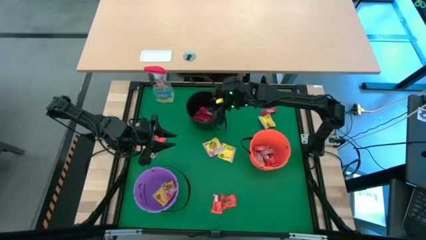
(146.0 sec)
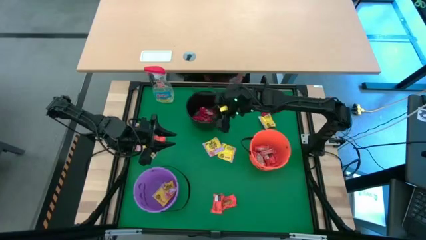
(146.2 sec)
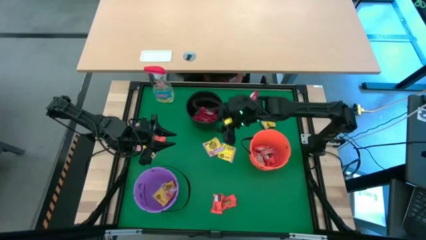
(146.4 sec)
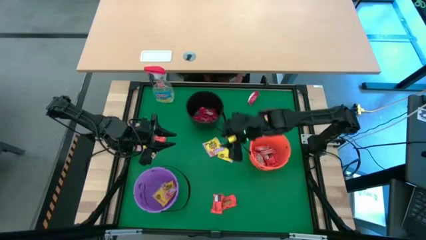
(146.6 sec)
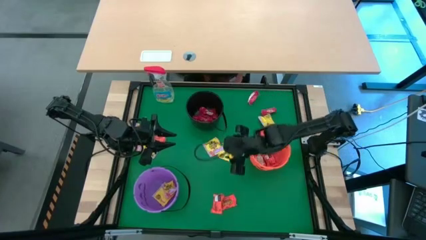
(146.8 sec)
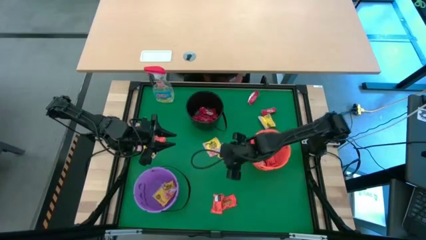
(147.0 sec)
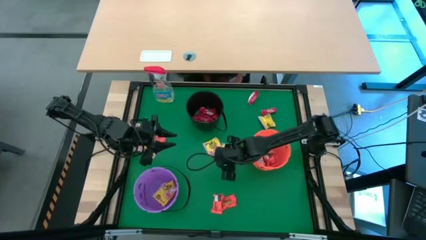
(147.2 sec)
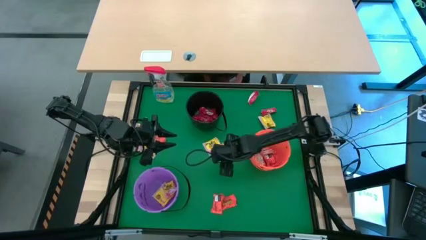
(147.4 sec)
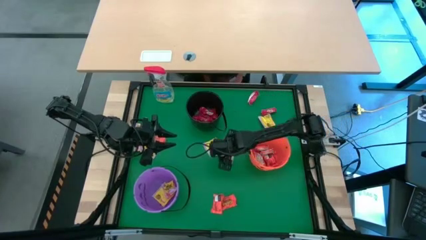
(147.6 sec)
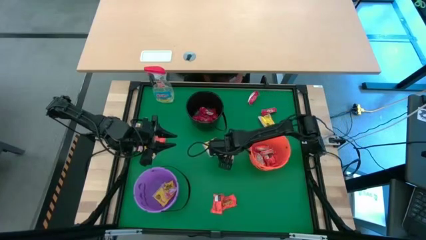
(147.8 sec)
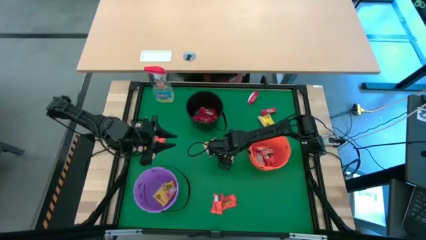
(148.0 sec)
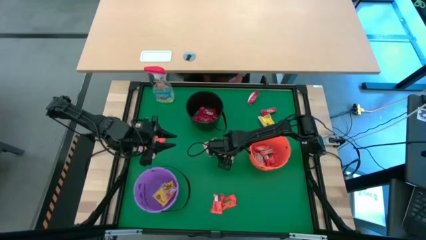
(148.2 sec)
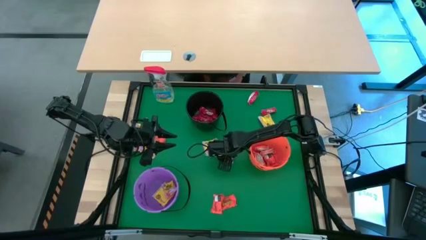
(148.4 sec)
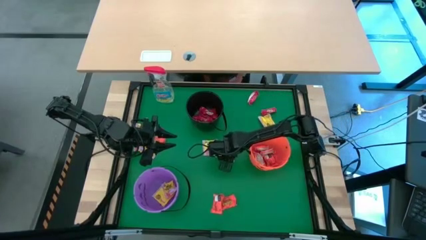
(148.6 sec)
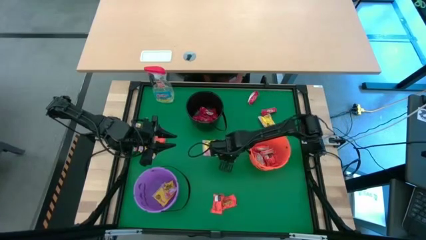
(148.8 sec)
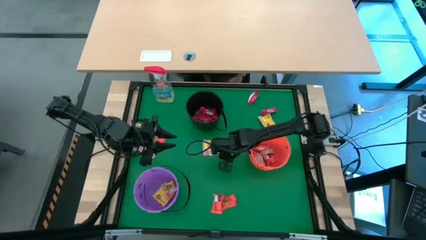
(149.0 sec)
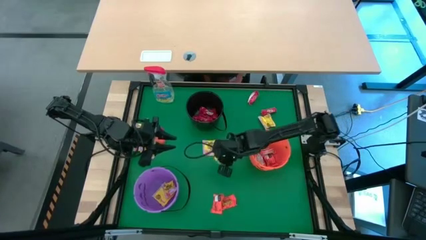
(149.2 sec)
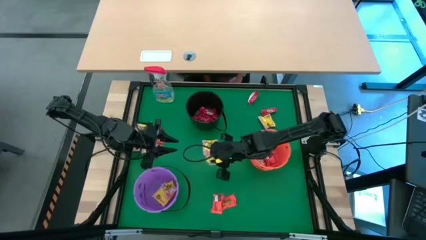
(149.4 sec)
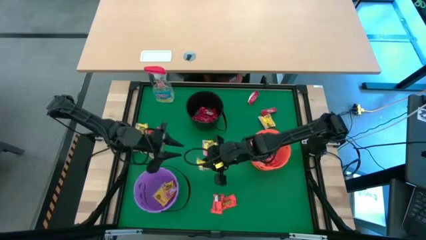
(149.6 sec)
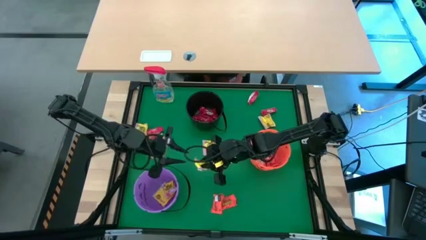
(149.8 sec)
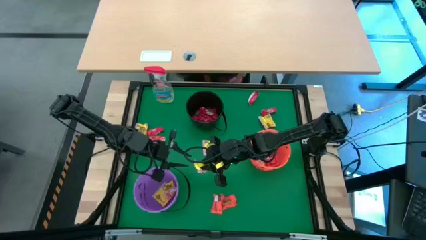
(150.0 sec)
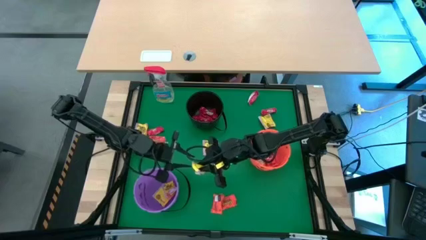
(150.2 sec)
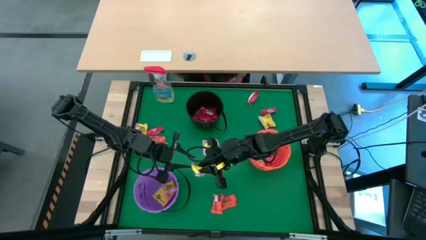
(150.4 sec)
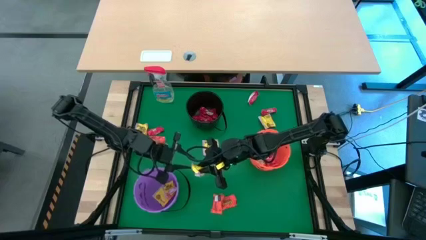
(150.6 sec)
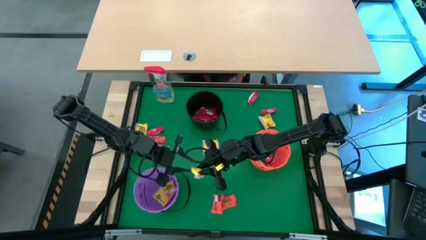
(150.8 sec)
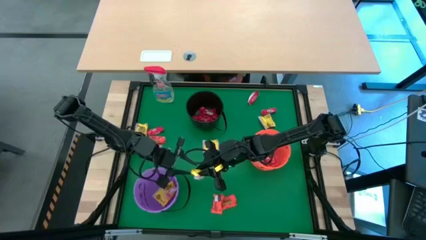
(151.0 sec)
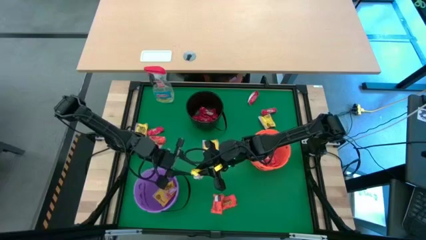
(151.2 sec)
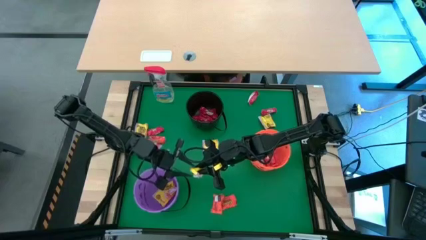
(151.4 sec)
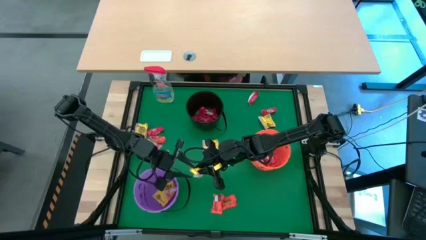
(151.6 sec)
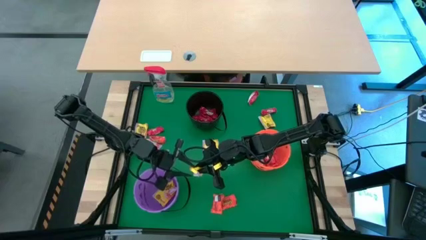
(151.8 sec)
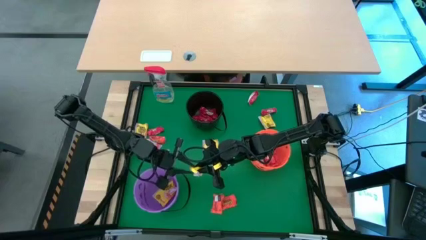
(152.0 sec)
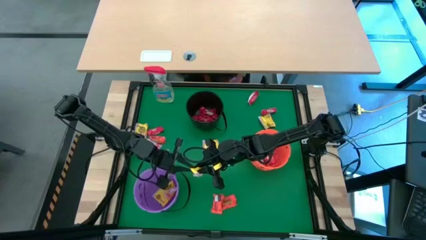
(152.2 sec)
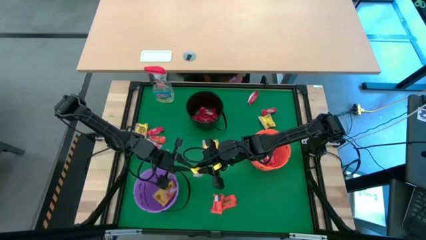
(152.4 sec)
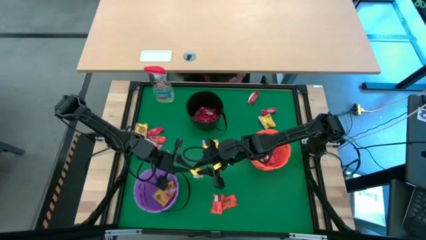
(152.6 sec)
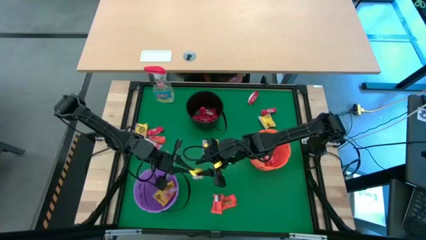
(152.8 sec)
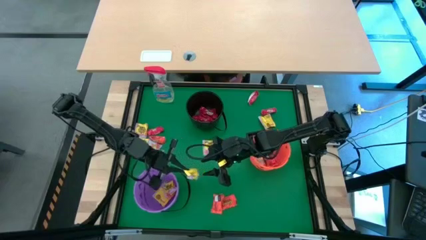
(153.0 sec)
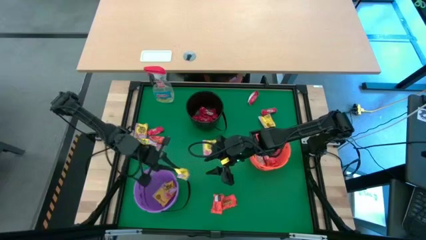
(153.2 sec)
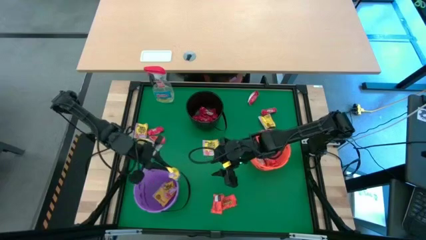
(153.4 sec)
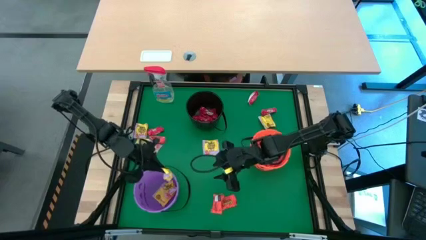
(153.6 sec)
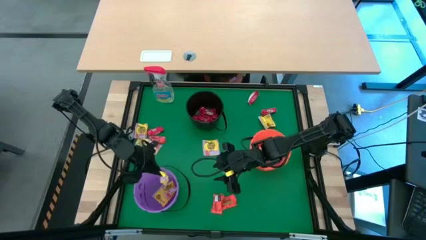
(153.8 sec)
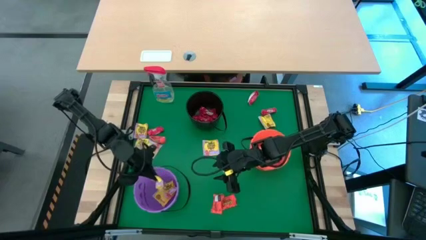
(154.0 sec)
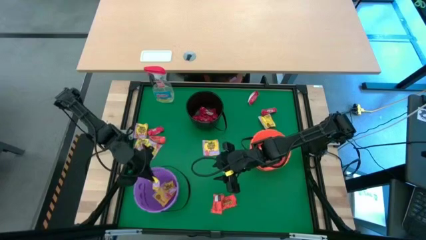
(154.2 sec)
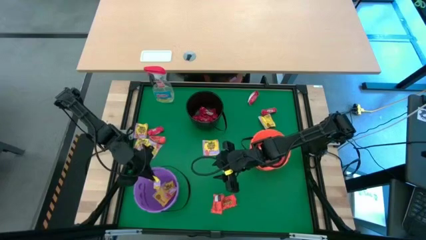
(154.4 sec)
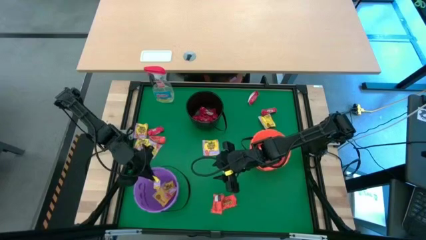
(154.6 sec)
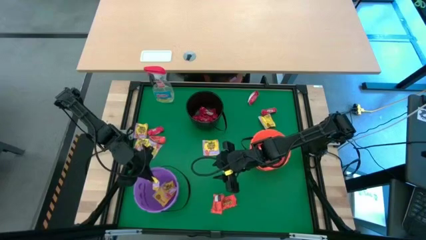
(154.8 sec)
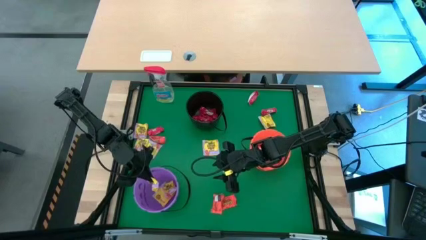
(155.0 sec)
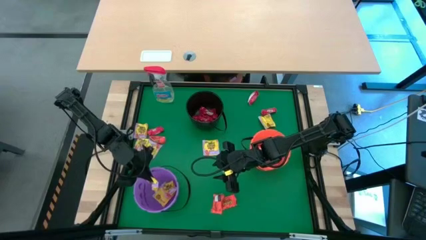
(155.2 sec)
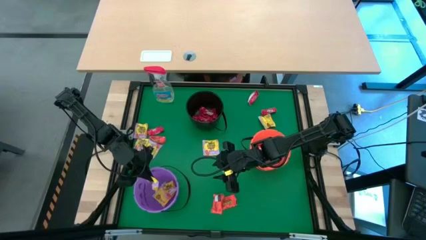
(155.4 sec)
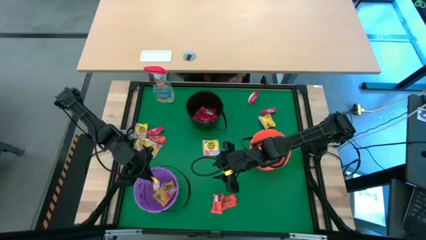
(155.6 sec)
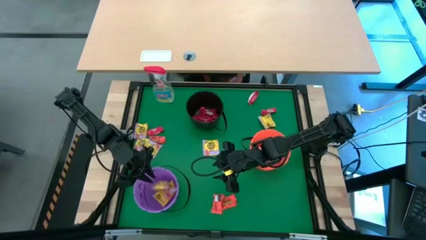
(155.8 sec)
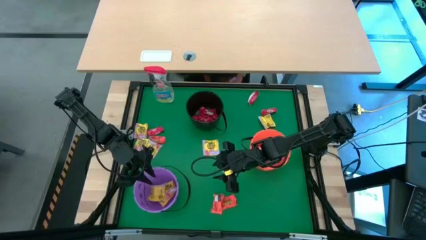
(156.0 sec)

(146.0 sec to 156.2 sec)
Task: Sort candy
Put the yellow candy into the violet bucket

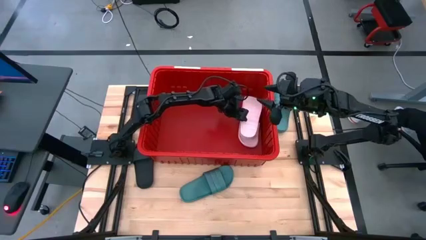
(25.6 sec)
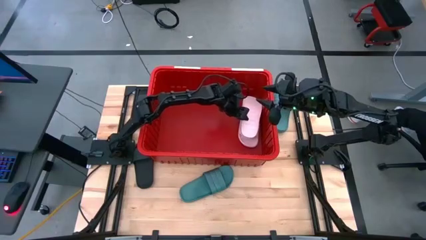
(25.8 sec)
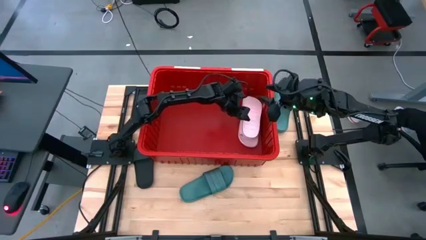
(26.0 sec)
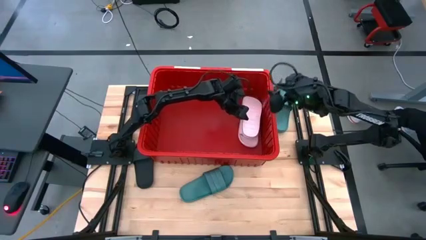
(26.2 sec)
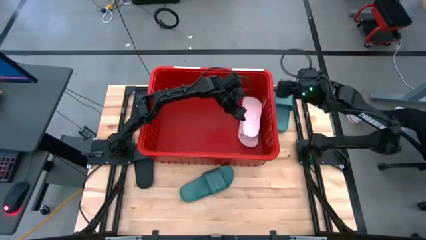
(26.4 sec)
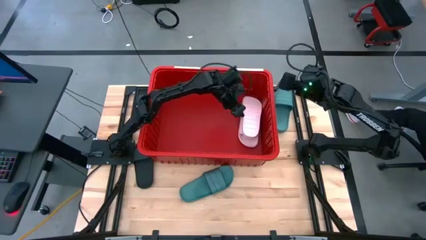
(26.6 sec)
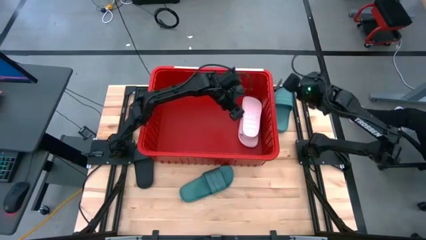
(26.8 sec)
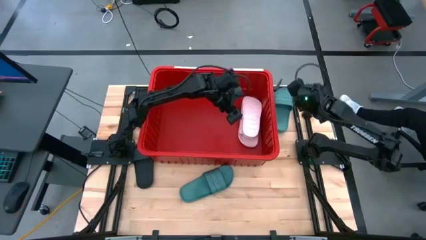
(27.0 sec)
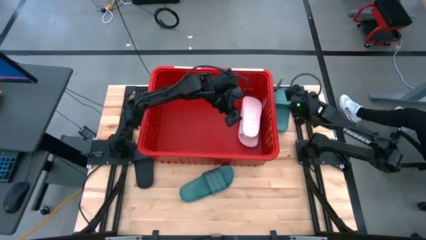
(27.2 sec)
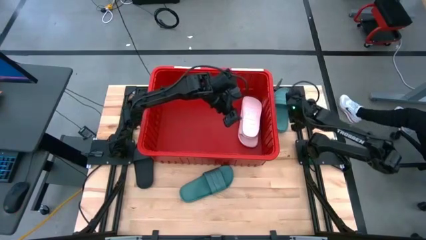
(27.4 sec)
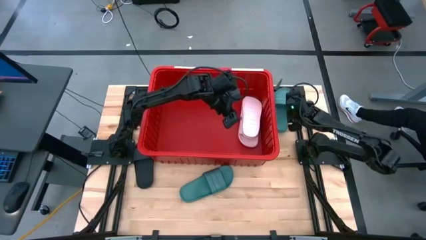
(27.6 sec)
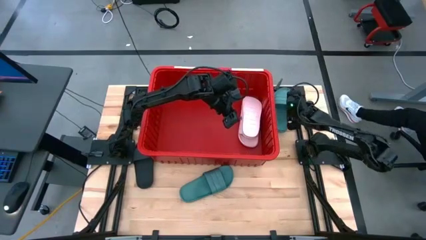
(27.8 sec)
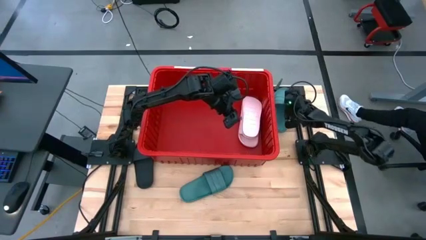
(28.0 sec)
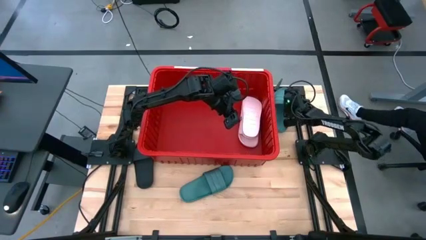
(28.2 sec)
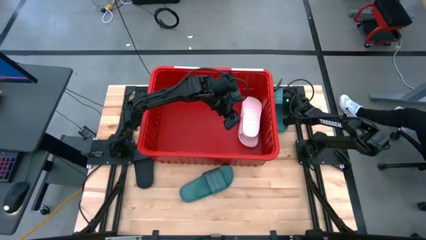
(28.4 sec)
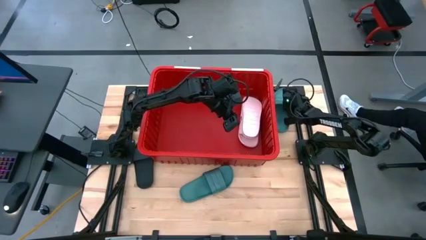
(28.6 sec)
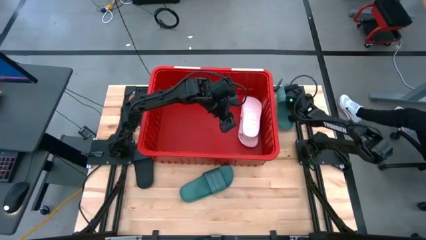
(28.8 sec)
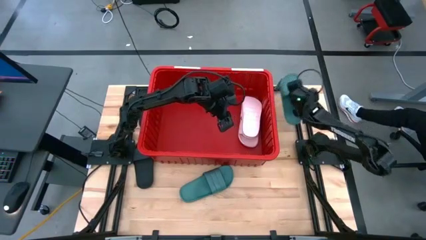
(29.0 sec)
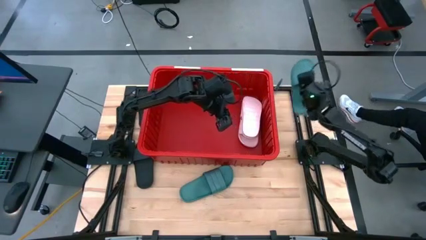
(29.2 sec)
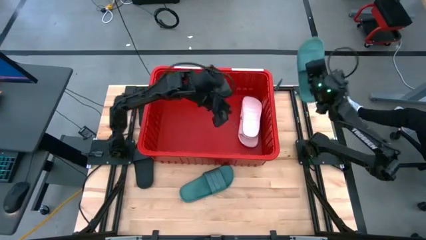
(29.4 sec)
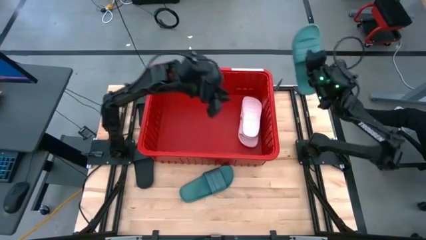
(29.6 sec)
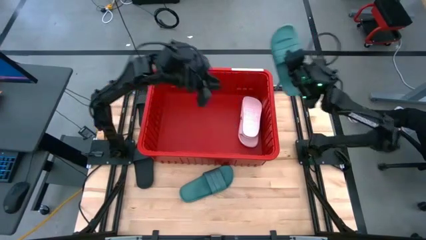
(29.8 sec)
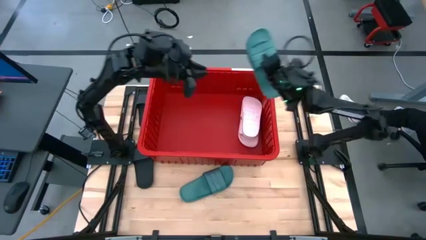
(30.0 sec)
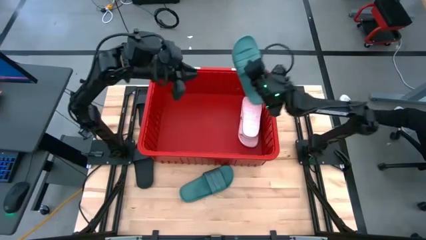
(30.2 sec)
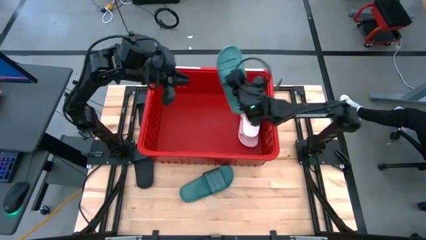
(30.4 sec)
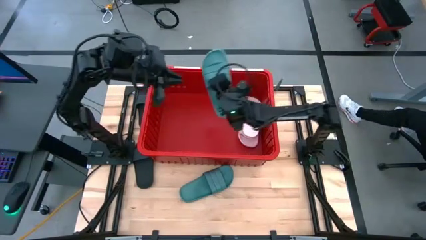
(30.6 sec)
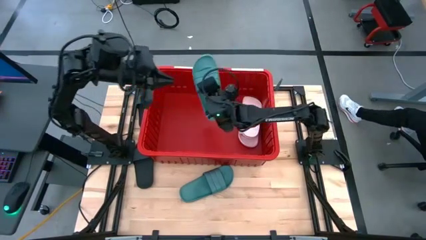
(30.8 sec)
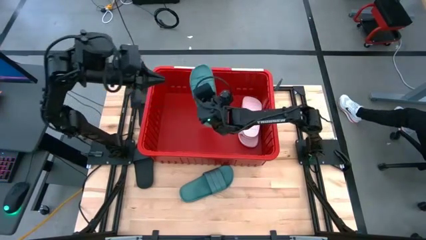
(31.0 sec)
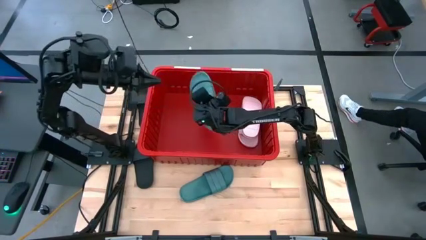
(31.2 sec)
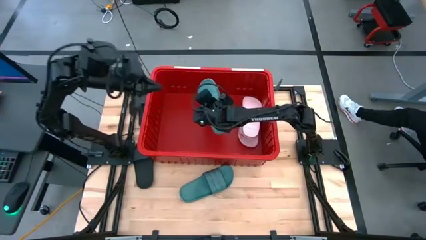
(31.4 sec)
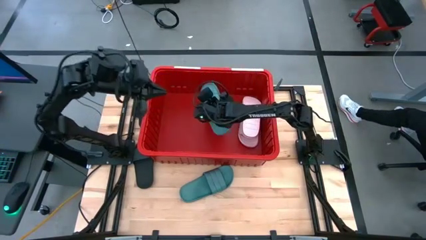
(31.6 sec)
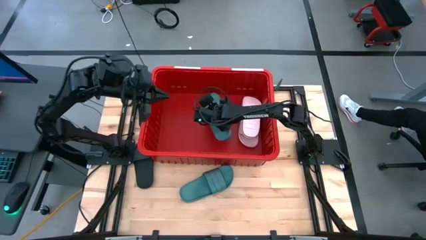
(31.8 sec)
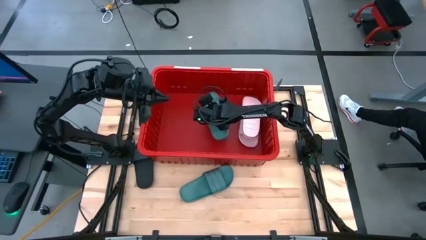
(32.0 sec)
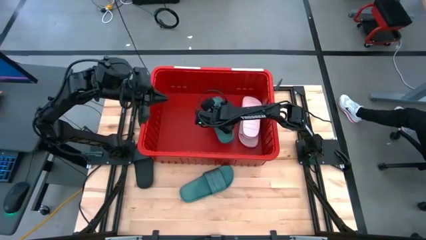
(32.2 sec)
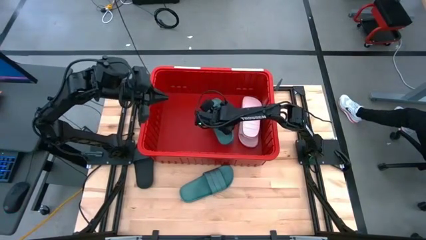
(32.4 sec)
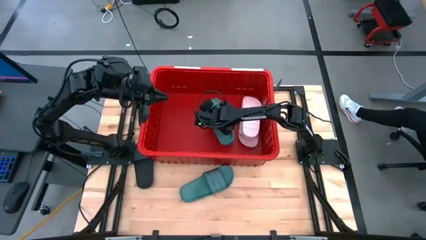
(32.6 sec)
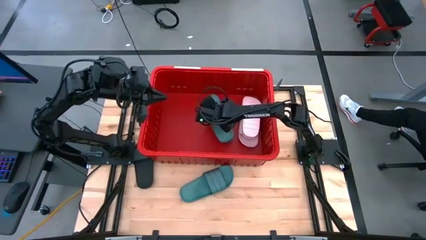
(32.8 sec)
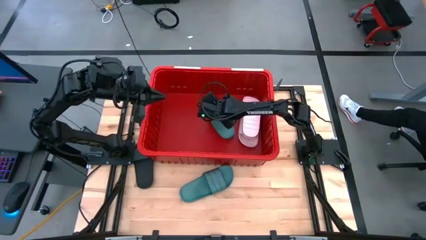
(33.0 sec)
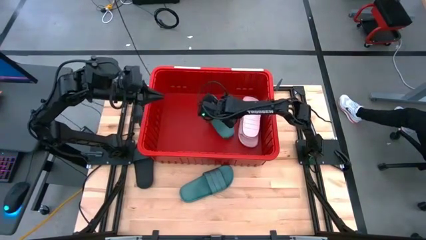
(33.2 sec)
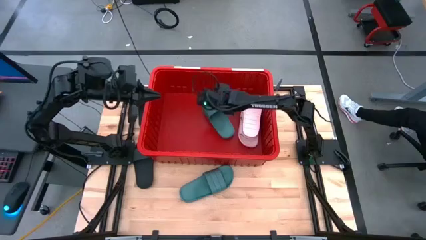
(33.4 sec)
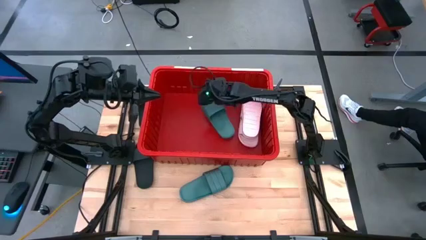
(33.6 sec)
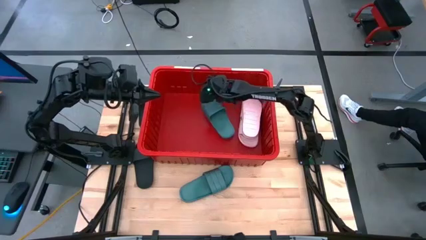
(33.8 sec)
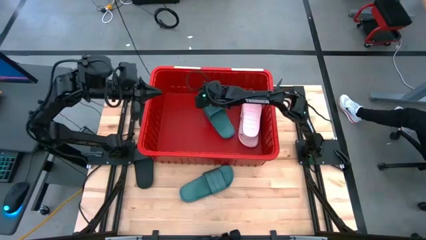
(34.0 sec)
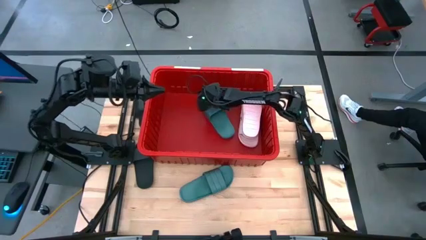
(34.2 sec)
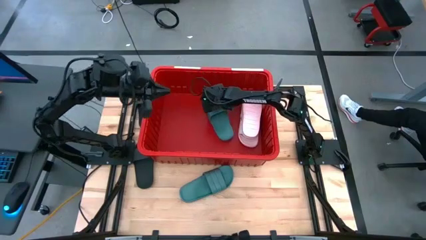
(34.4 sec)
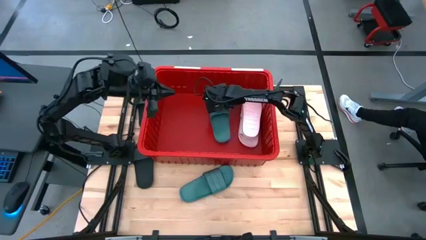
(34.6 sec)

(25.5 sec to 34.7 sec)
Task: Pick and place slides into bin
Put the top green slide in the red bin
